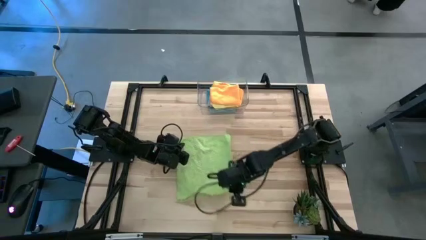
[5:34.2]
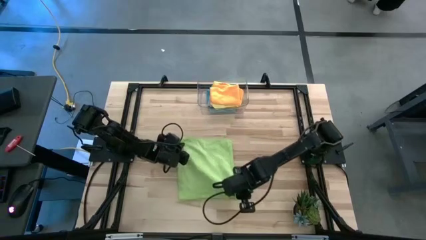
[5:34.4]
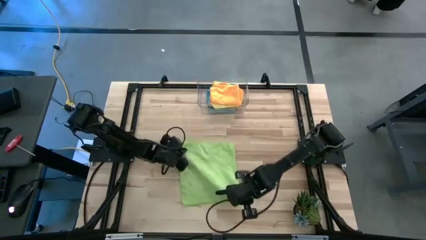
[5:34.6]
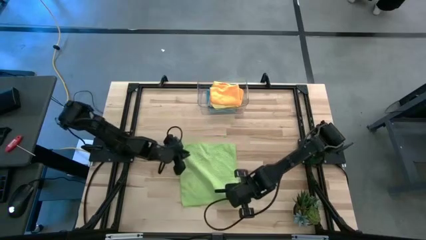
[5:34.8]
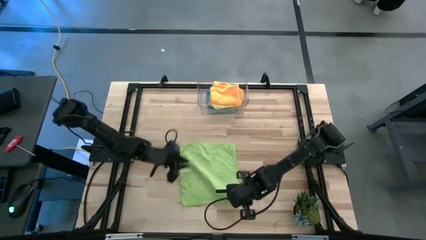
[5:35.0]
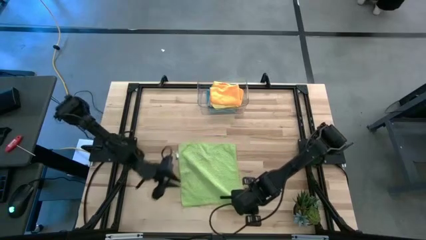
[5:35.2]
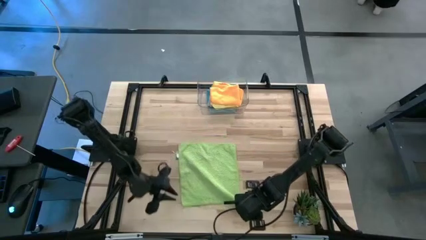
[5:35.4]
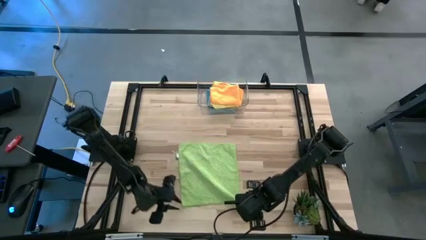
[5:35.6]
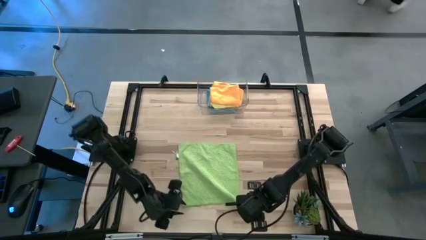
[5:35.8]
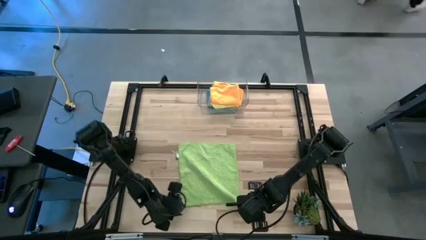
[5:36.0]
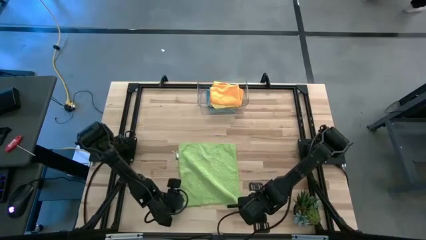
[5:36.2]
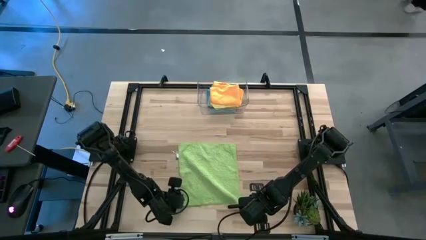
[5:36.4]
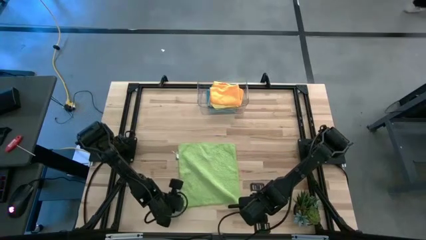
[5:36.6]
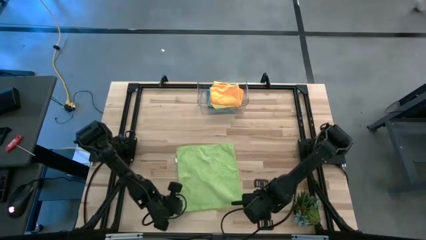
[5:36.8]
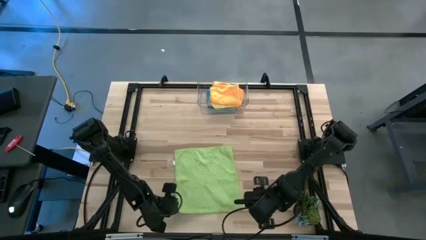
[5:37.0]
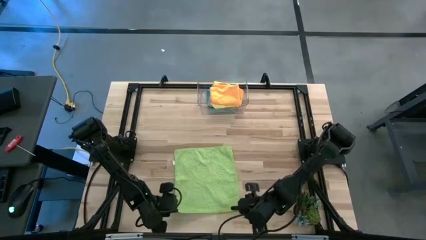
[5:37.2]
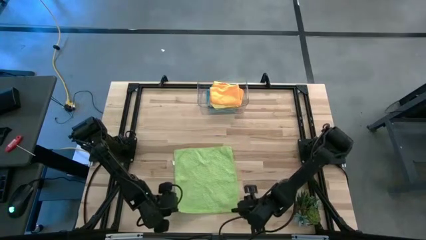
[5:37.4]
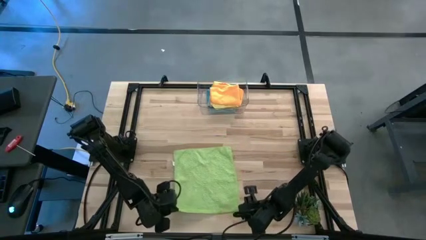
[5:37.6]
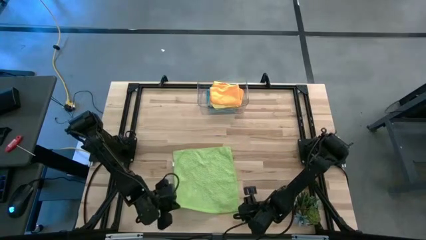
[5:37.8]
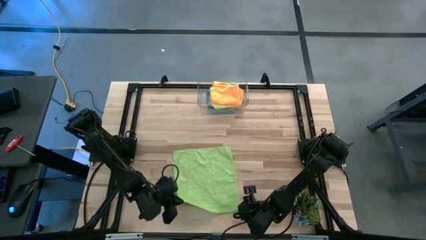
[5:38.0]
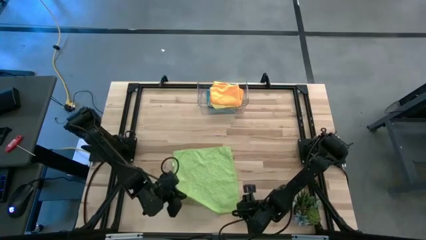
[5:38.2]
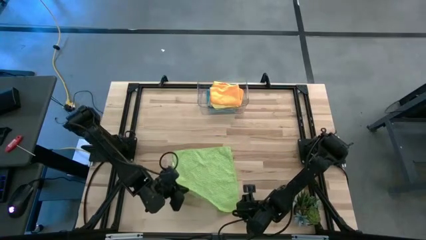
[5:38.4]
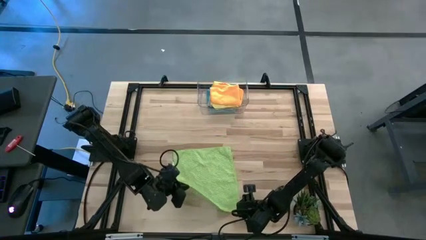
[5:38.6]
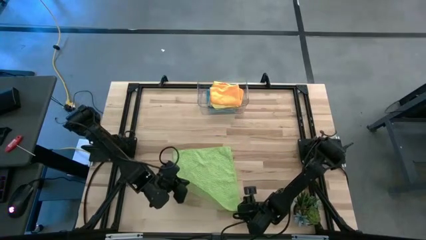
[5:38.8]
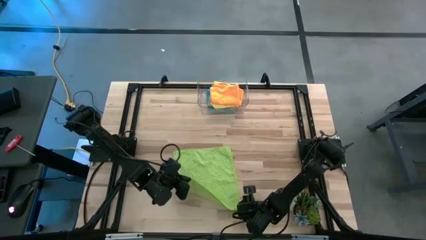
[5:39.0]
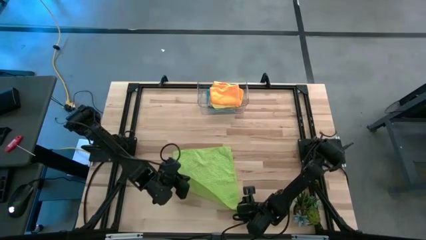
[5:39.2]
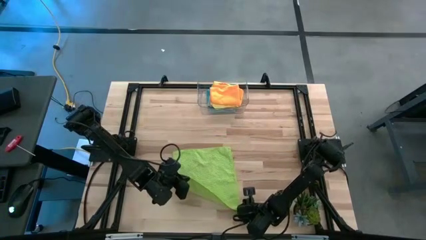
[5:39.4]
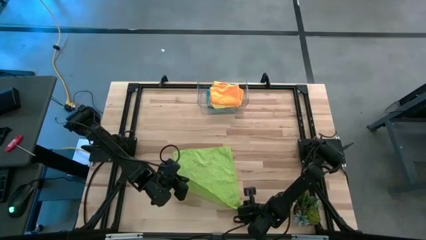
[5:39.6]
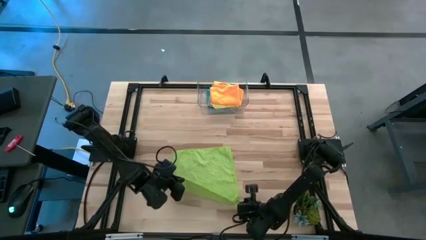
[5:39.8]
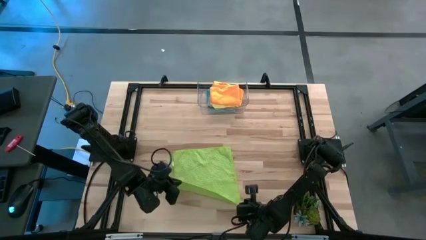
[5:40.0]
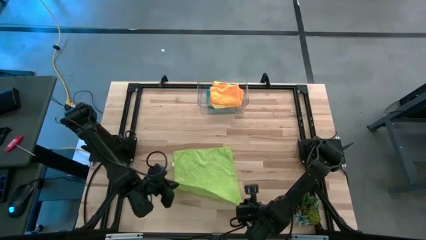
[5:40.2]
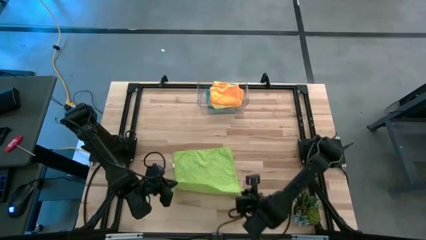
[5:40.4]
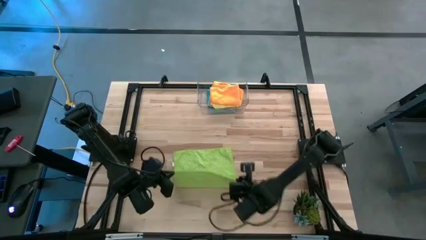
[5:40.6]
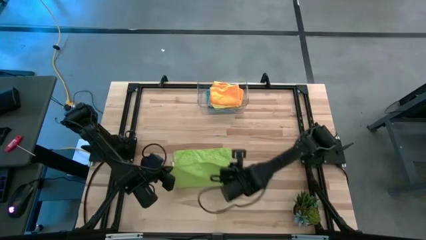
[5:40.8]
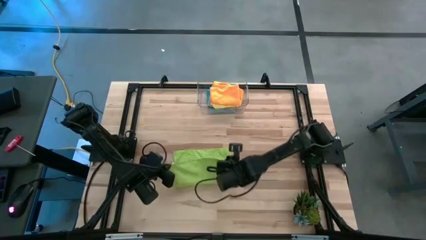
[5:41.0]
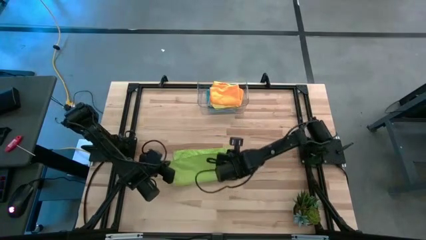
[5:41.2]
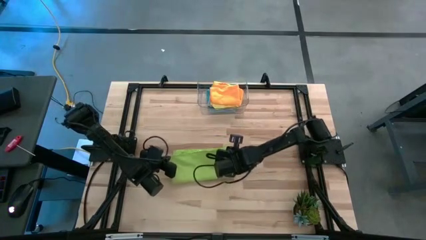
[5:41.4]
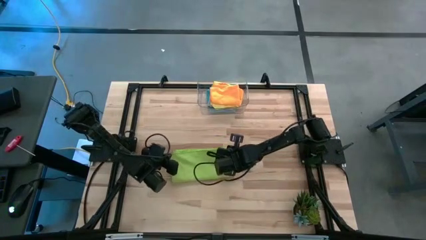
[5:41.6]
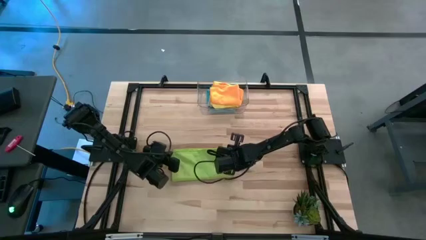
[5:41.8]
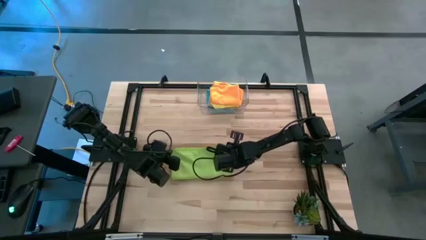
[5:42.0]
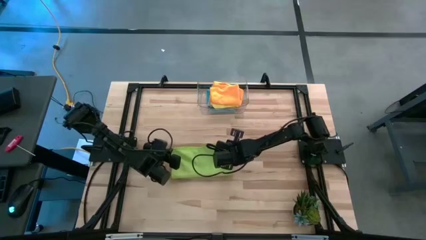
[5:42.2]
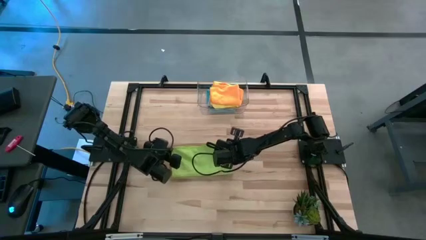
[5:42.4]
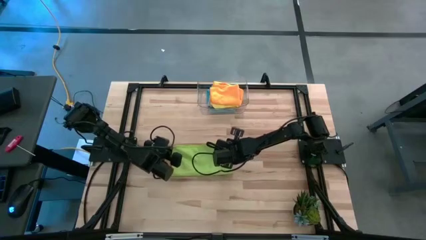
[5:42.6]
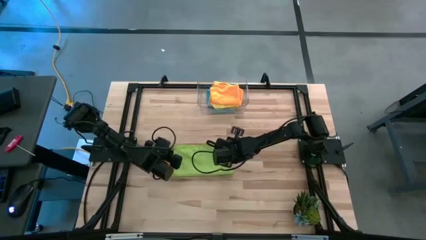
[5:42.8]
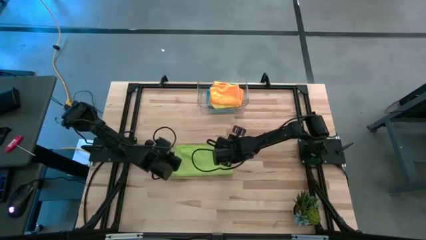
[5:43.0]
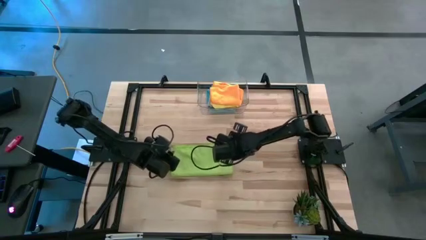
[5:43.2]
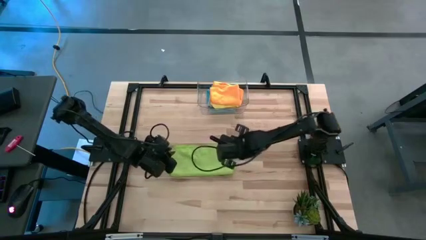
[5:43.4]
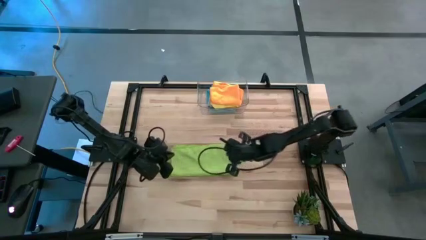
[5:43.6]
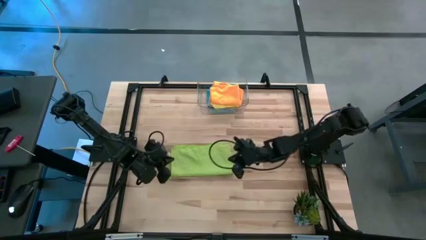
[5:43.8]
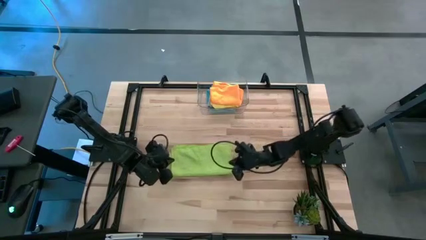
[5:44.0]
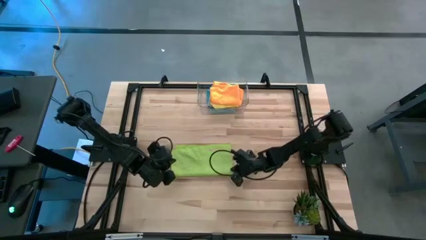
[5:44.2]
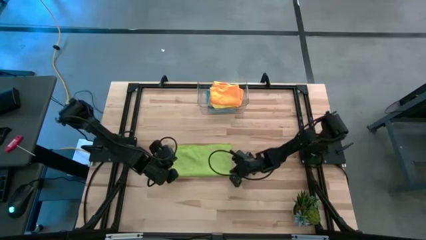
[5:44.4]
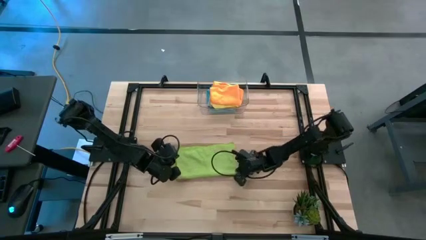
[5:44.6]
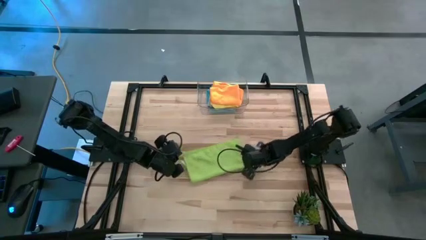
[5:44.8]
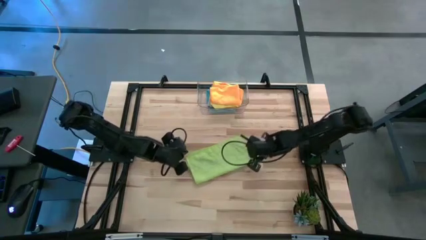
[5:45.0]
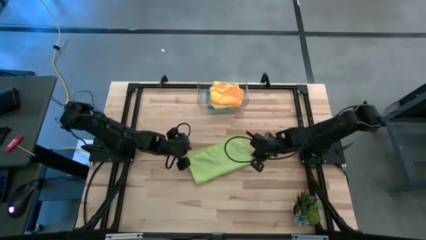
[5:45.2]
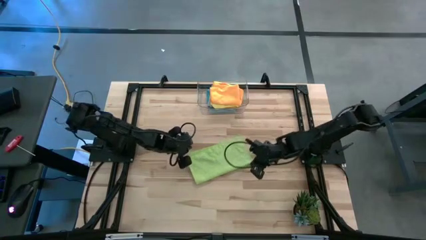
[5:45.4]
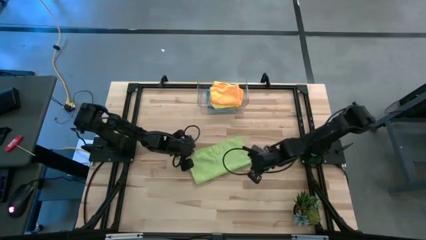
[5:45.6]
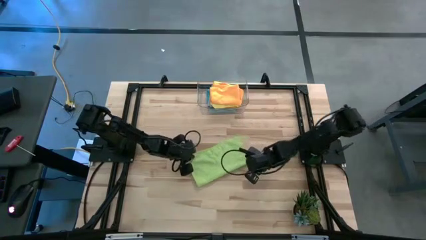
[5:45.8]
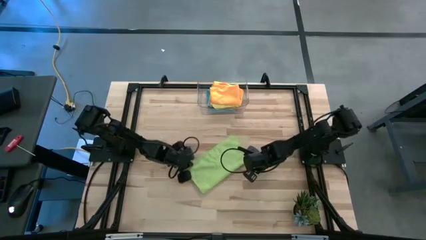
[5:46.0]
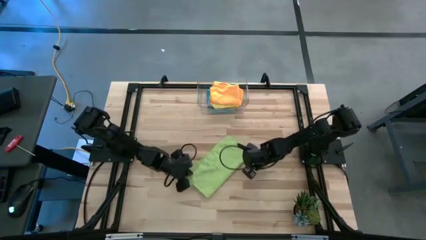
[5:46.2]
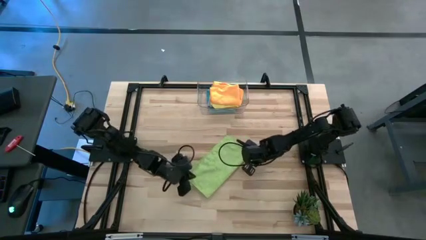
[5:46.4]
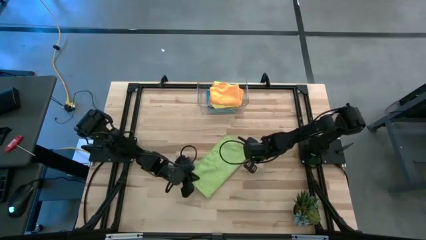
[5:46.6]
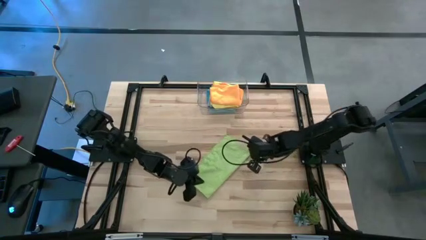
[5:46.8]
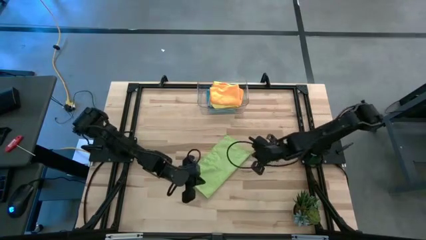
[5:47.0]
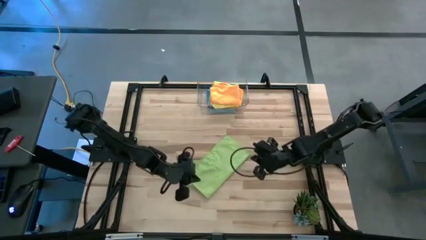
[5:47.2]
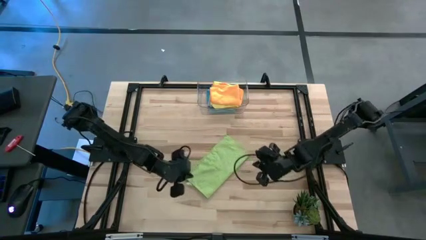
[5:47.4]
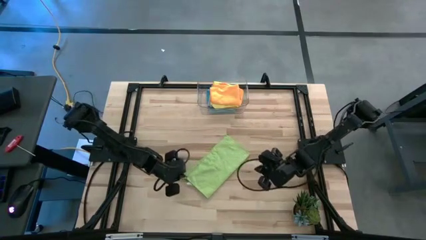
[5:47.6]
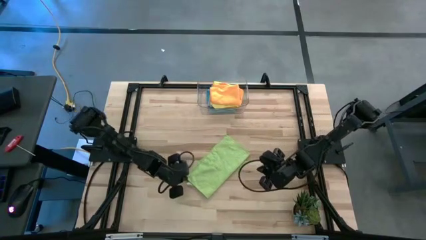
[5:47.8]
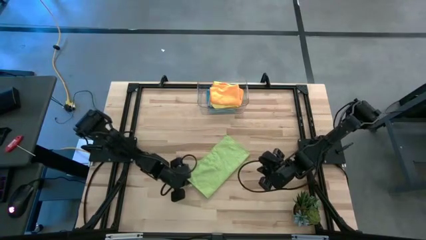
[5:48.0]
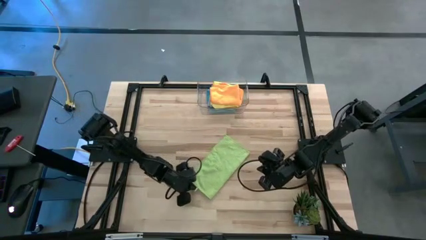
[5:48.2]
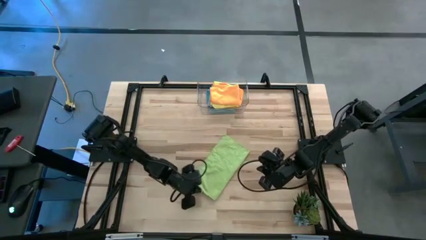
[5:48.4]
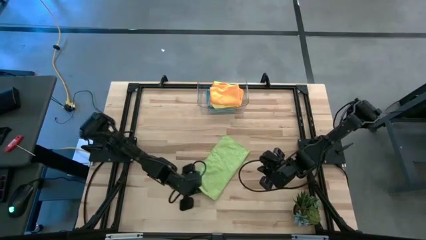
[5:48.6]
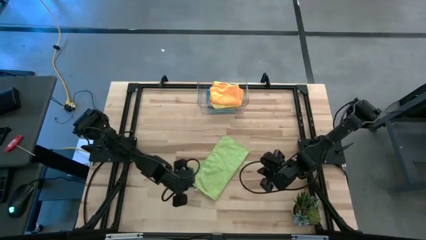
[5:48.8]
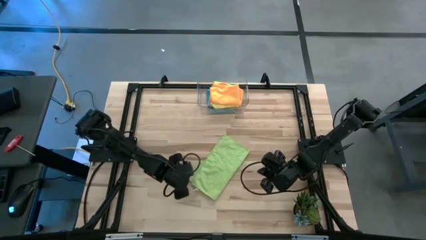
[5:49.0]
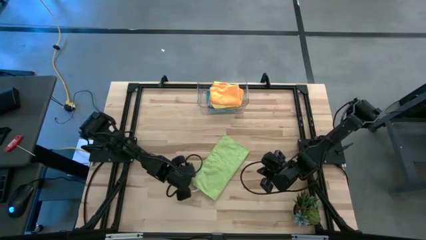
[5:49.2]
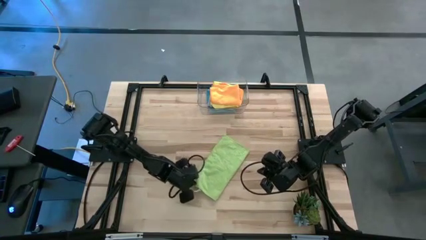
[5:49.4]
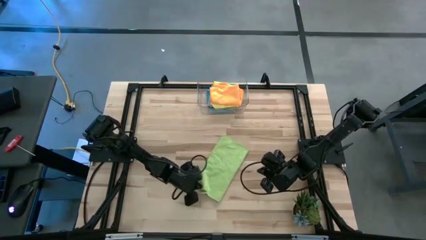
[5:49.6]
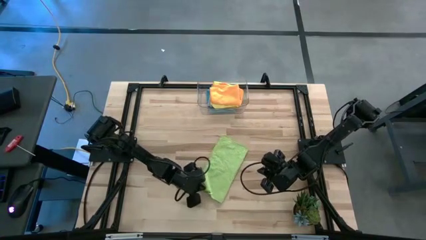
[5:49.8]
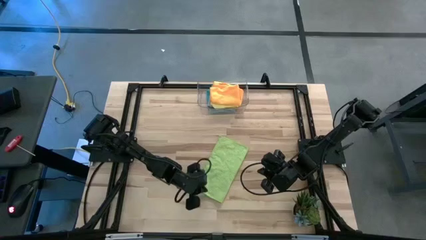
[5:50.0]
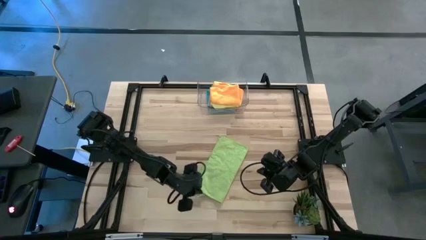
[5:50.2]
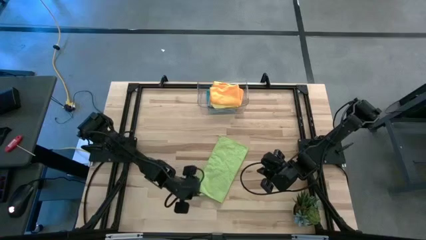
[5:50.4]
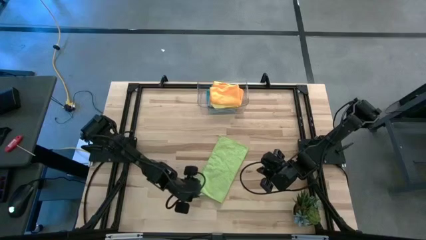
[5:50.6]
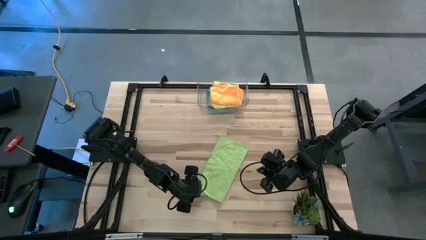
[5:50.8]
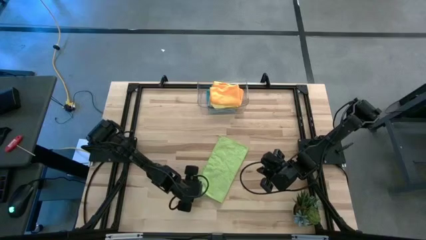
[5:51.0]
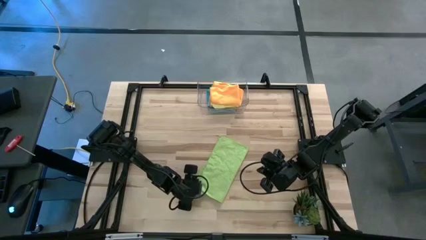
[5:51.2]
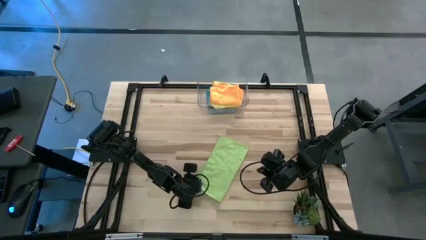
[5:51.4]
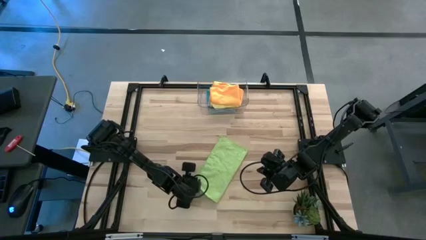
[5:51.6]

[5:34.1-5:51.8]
Task: Fold microfiber towels
Fold the green towel
